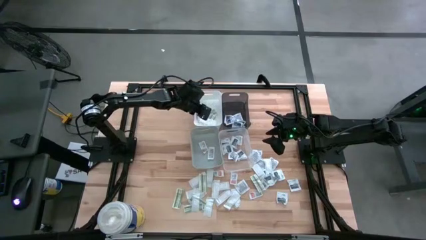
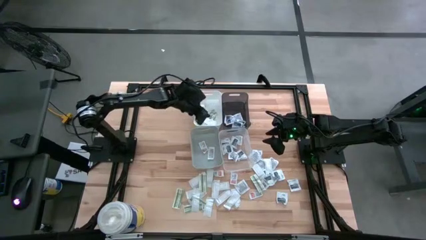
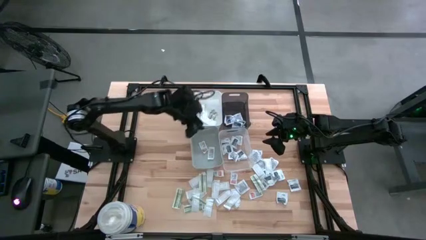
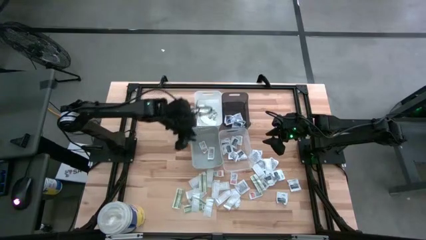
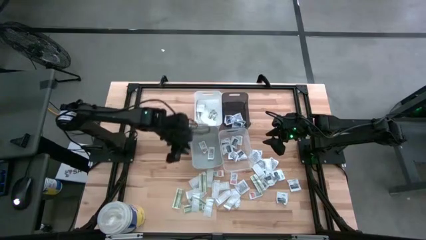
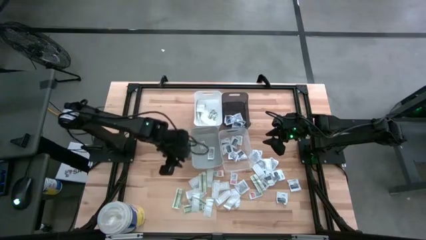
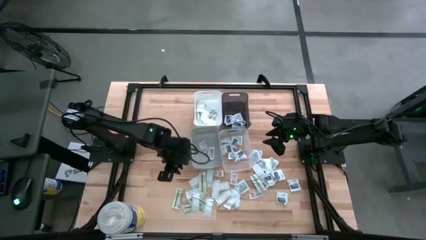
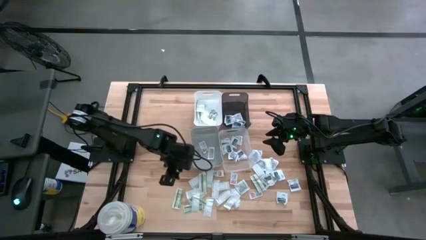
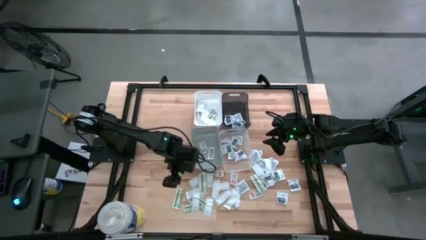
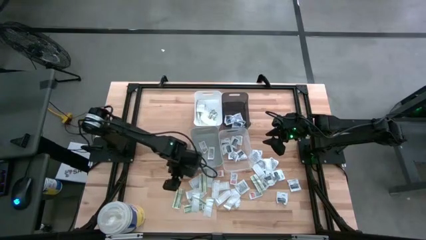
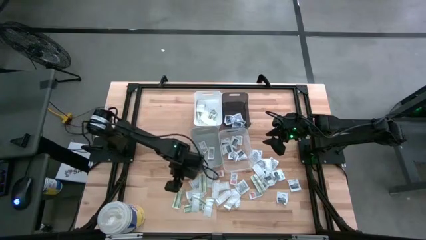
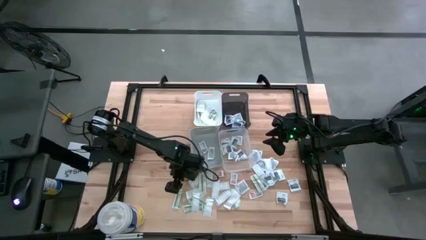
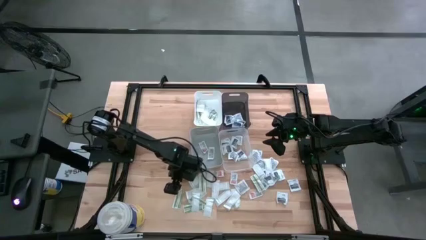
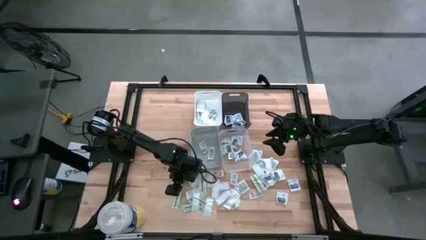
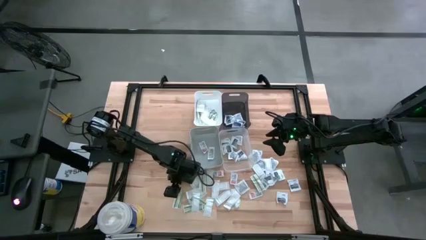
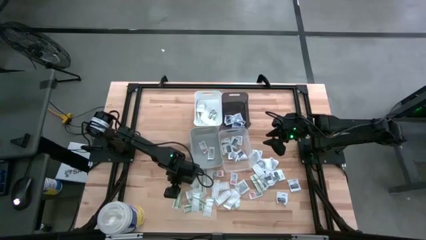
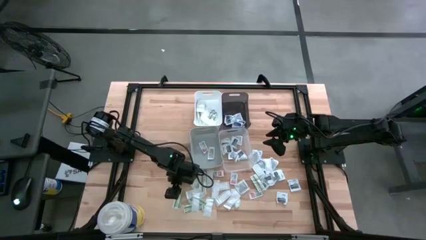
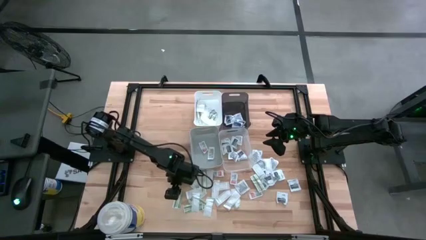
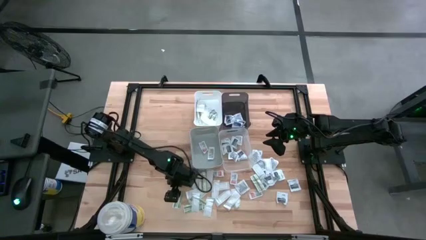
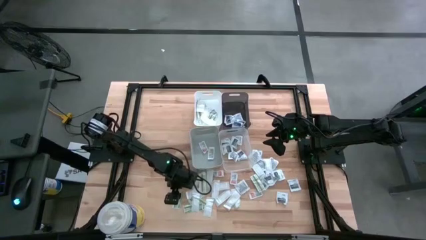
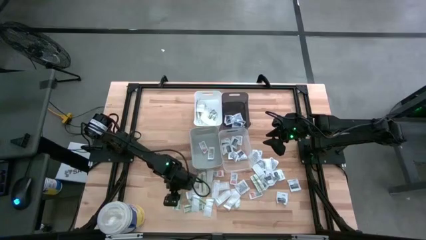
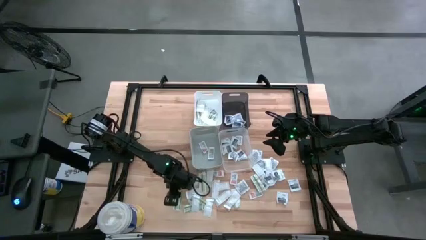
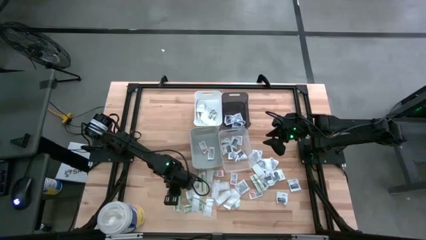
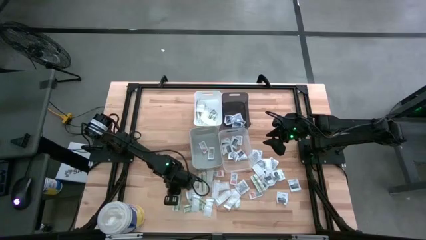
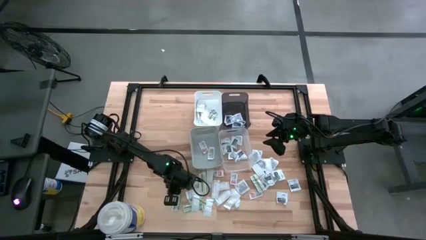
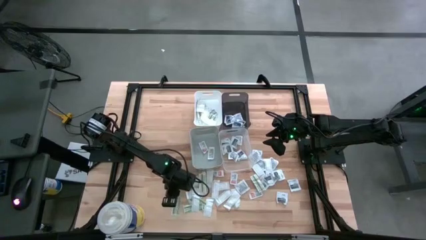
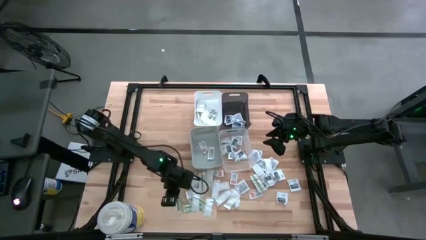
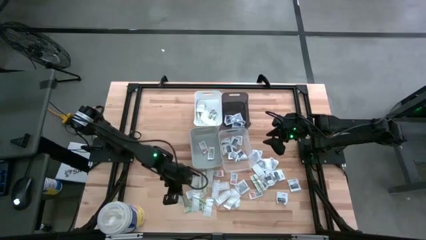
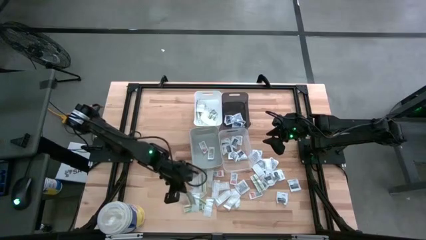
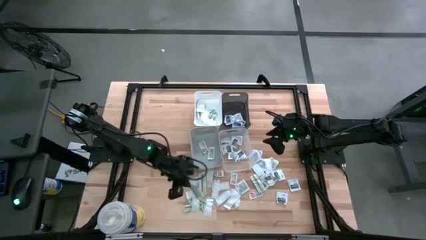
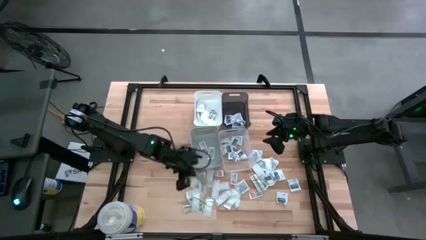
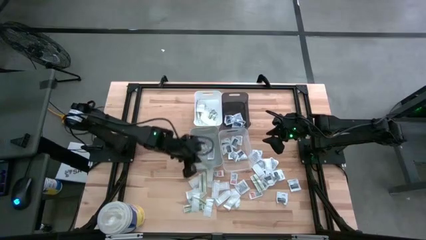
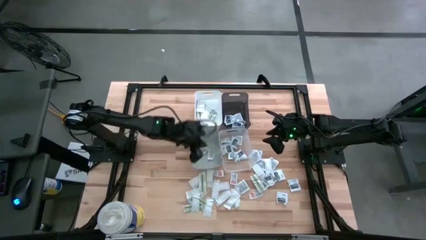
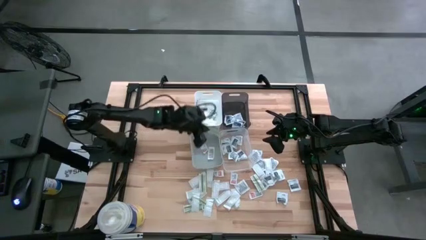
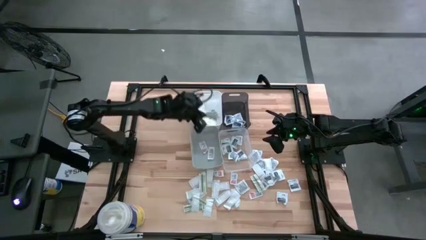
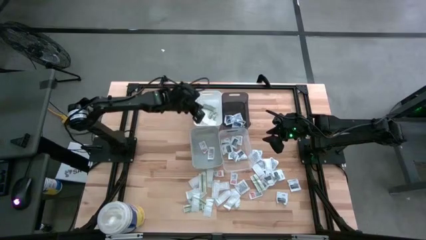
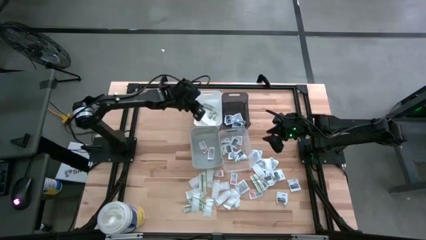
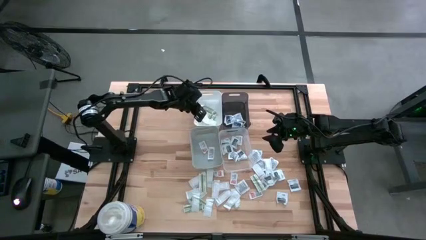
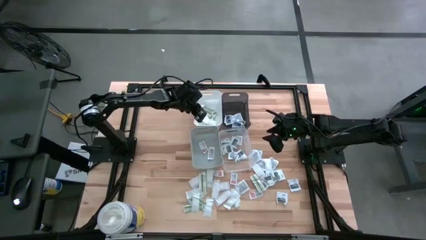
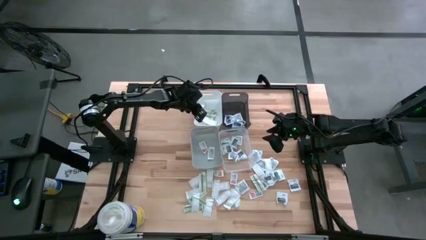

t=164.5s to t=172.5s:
Task: Pick & Place First Aid Supplies
Put the green bandage pack into the white bin

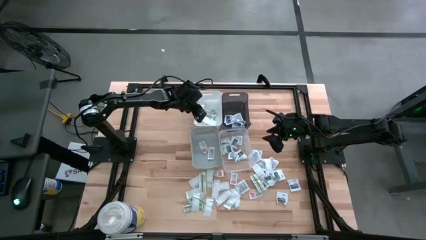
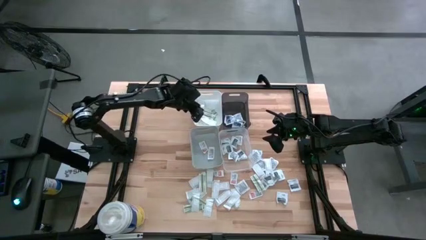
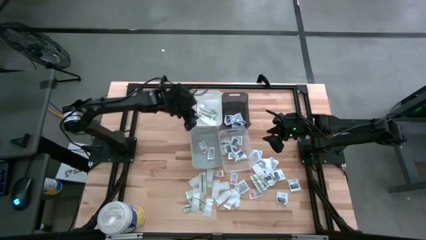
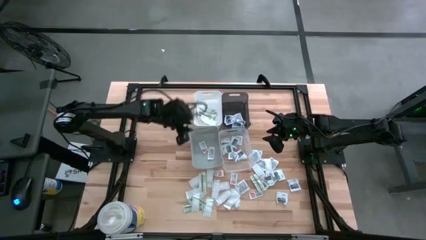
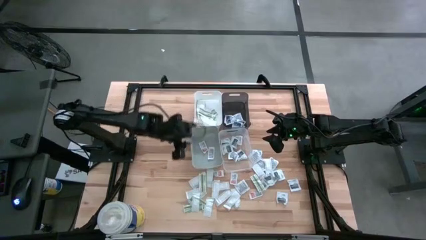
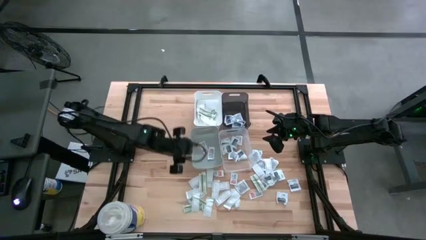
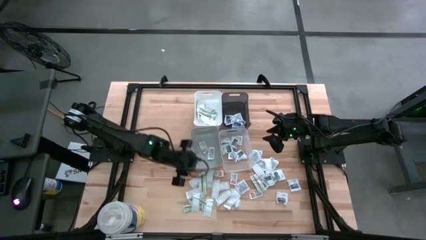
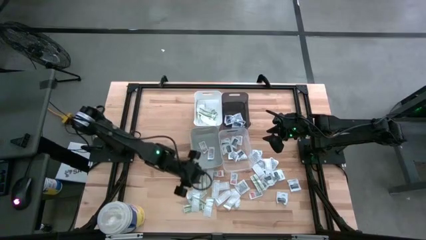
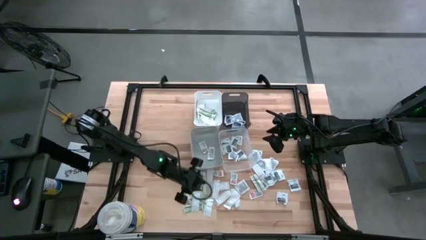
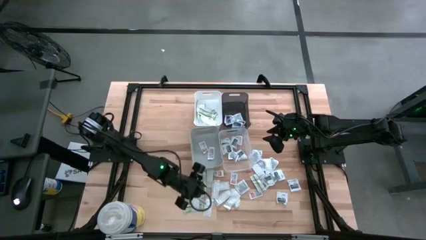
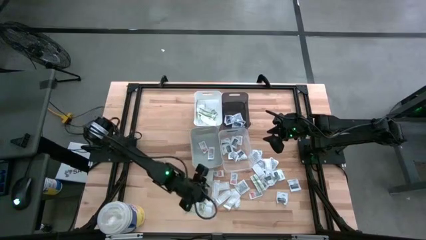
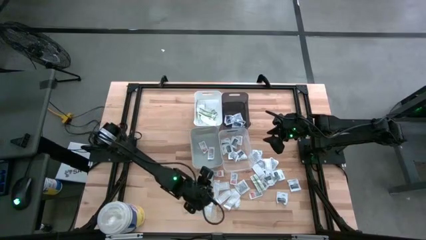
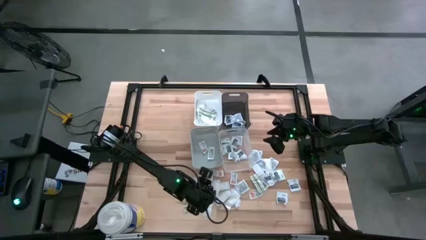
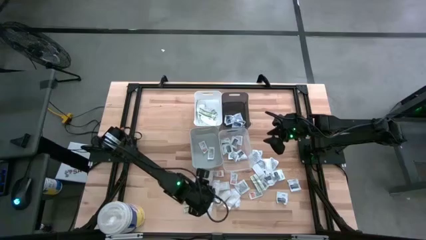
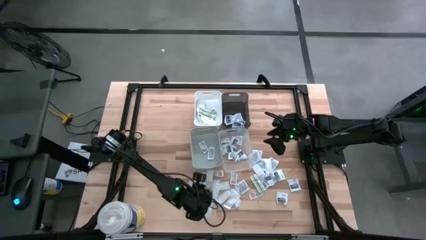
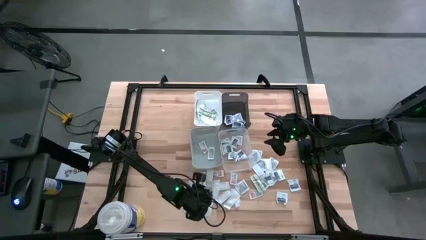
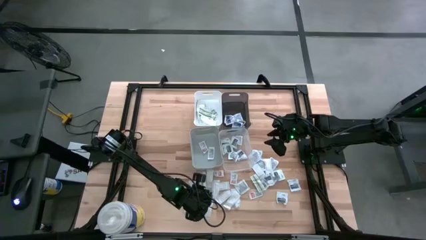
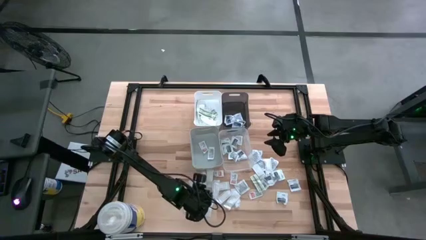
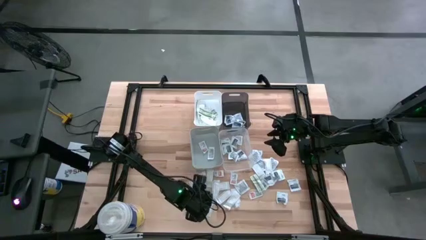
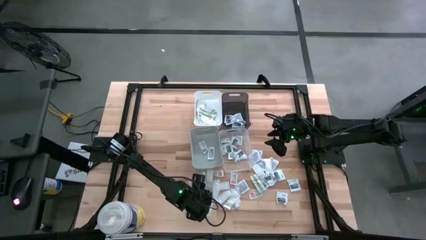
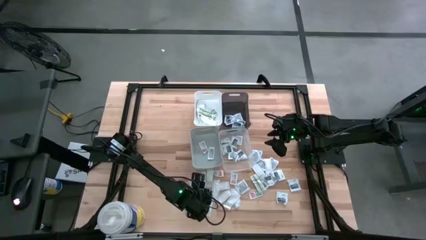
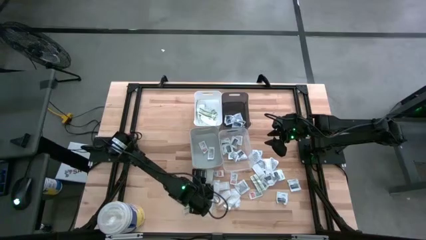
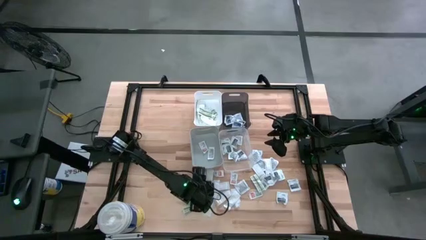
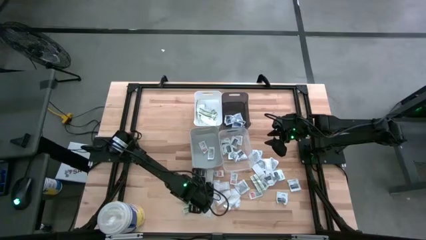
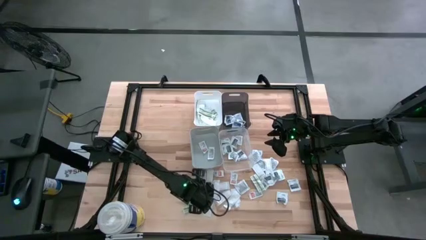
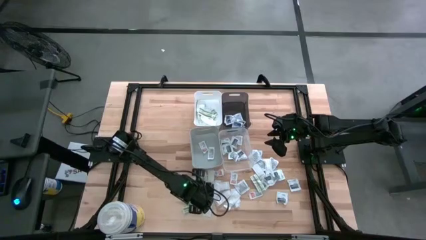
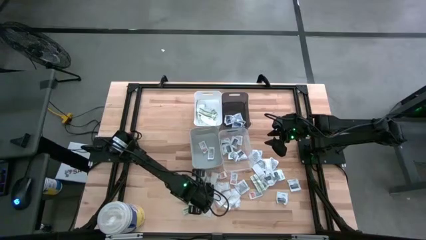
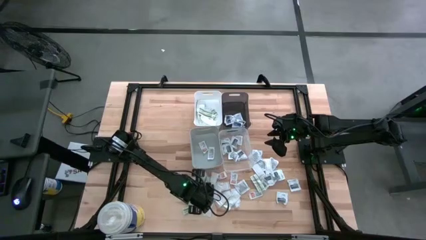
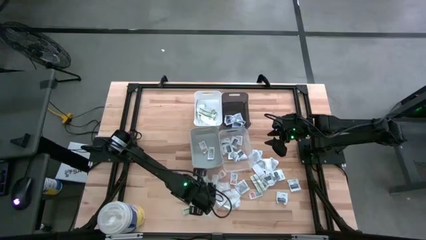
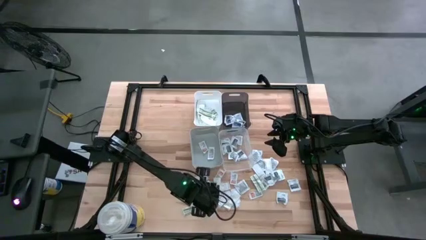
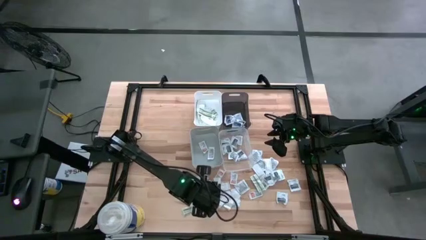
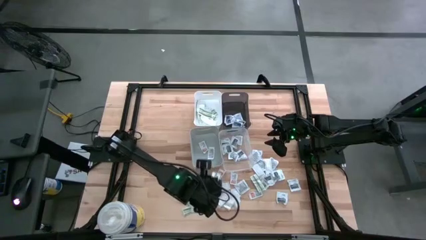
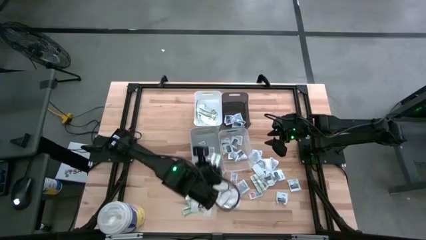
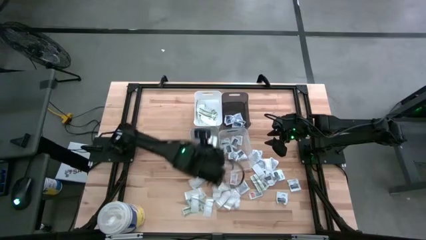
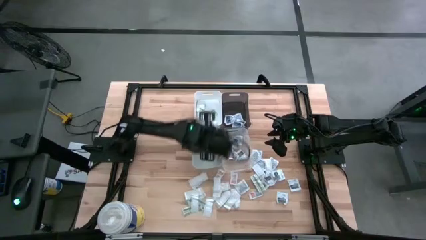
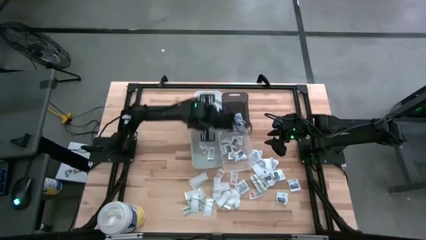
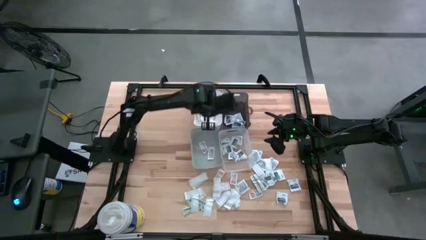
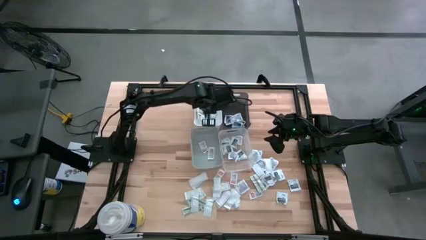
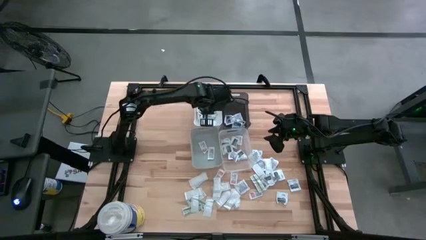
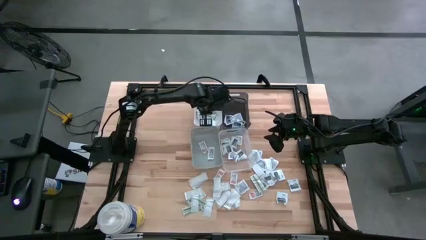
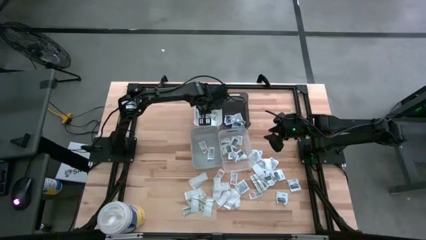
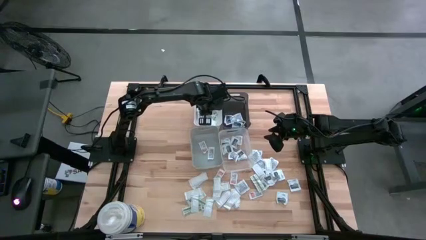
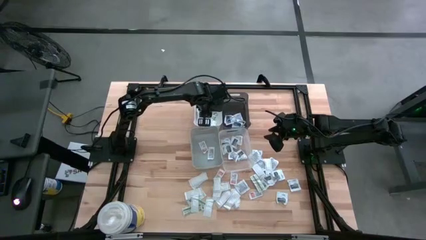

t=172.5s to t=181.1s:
Put the green bandage pack into the white bin
